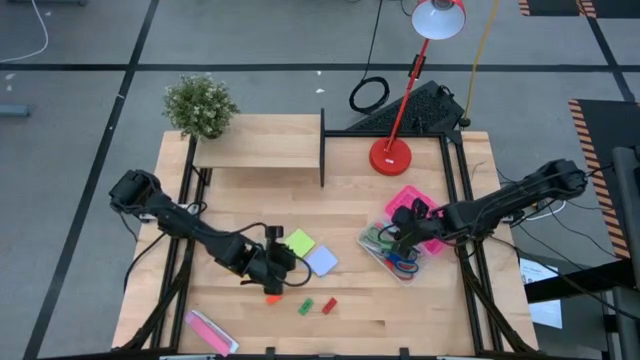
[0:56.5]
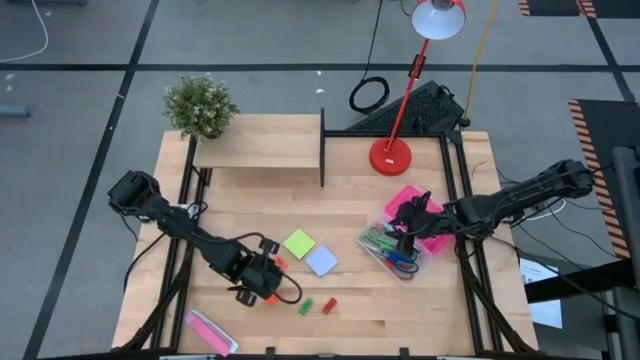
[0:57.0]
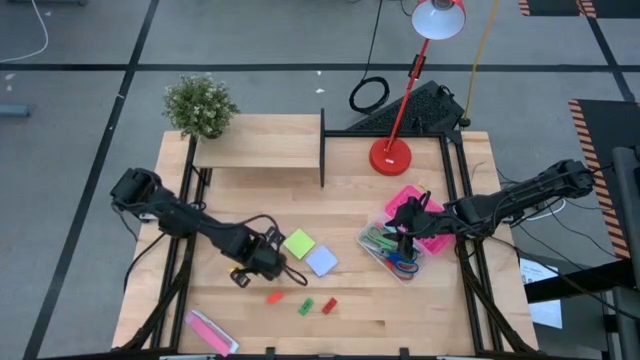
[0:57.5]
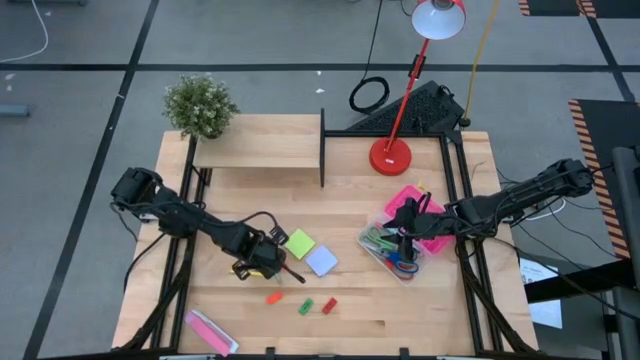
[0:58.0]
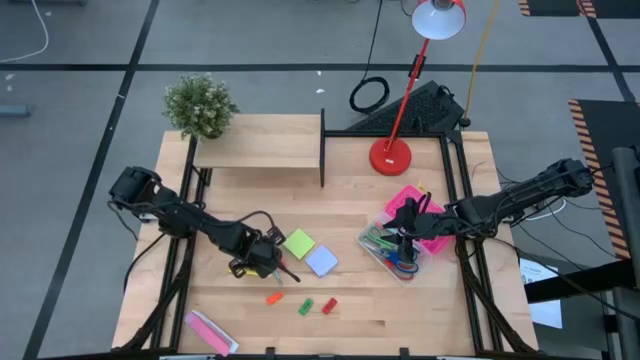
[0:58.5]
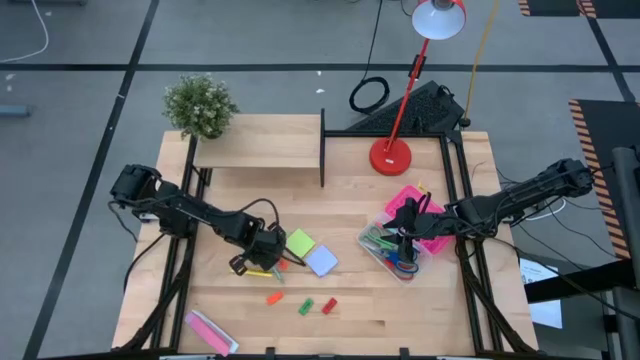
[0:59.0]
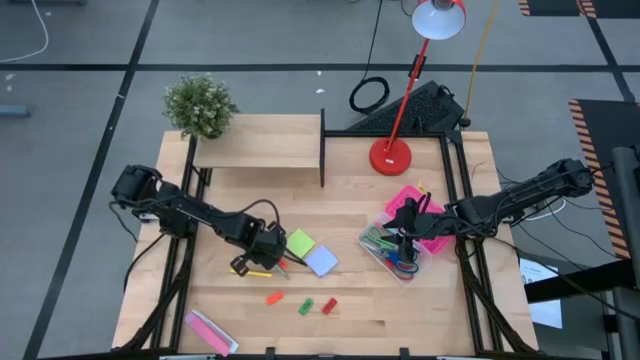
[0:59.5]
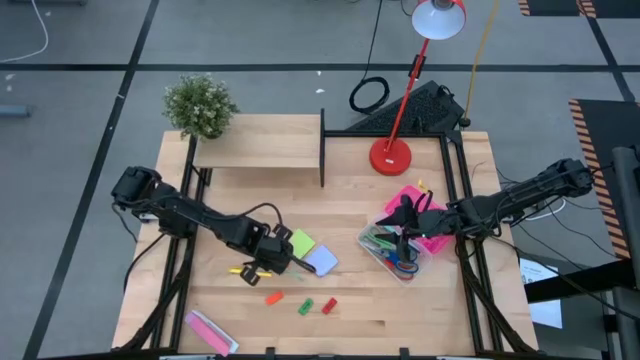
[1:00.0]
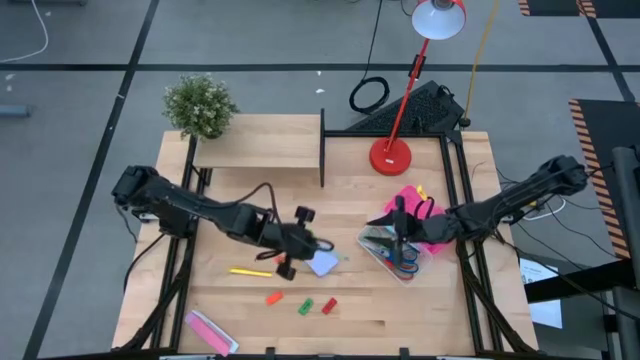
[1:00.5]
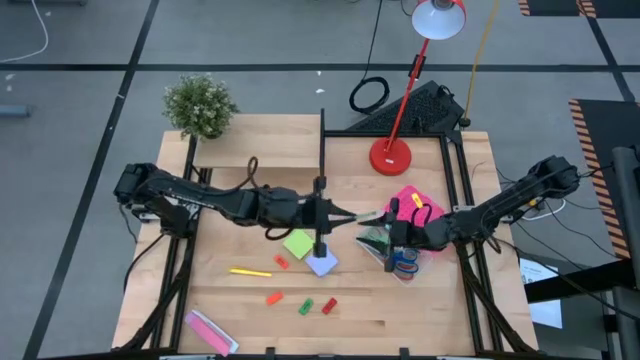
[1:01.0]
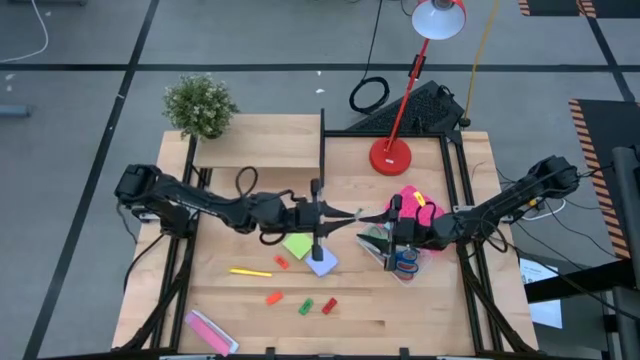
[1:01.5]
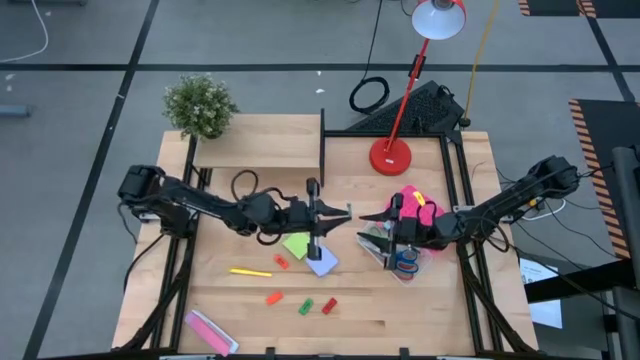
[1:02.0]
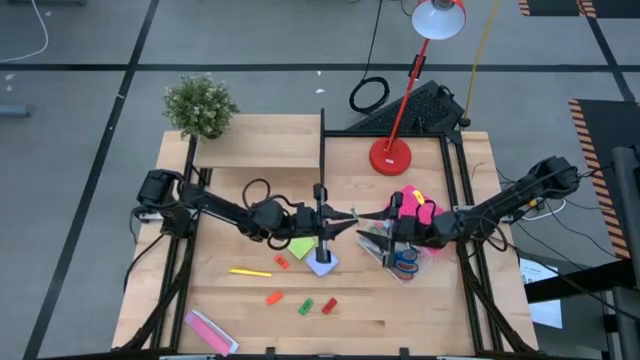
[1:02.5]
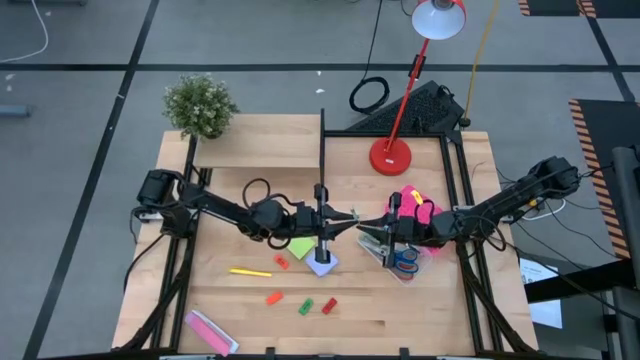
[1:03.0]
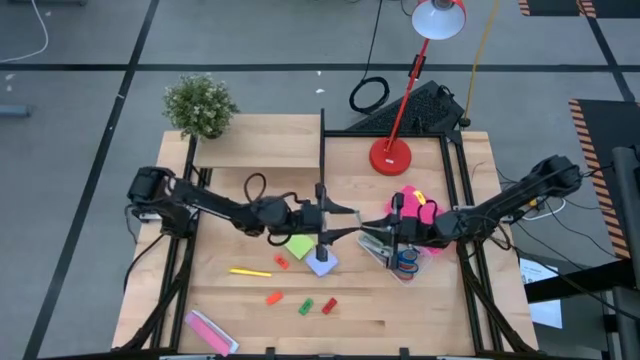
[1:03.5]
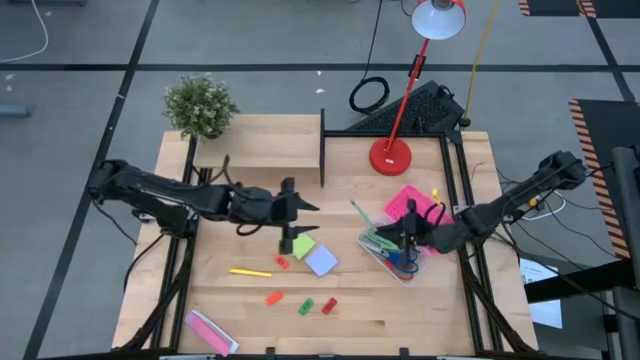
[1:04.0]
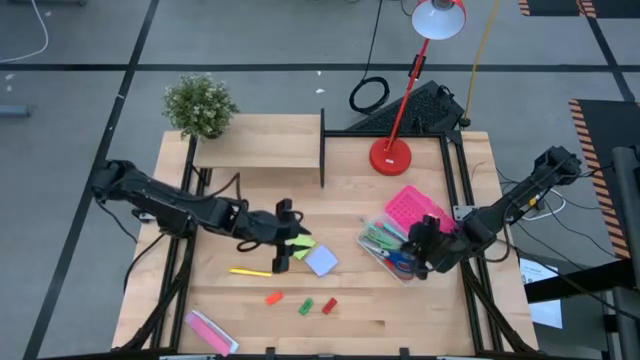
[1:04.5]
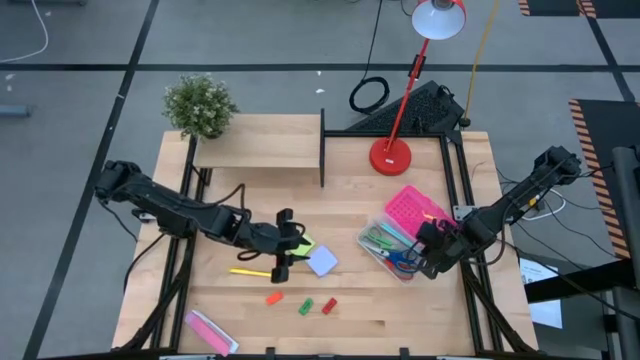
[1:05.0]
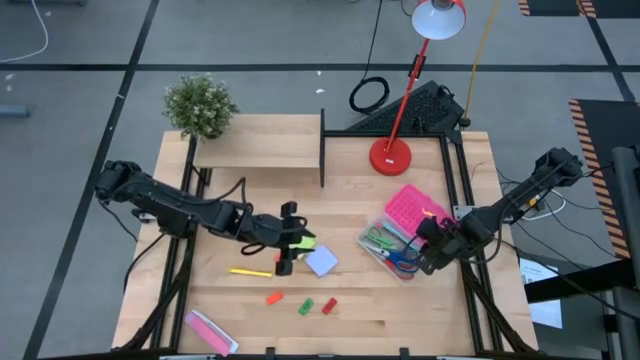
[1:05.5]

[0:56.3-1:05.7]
Task: Pack school essentials
Put the blue pencil into the pink supply box

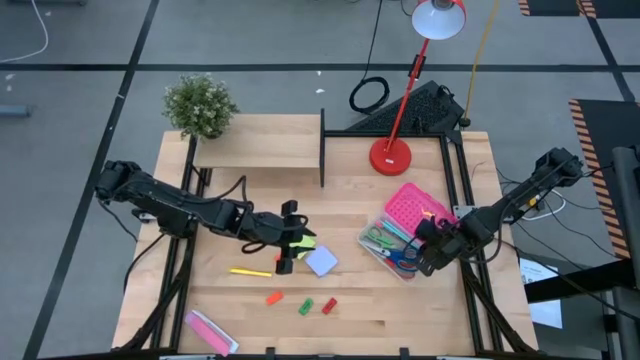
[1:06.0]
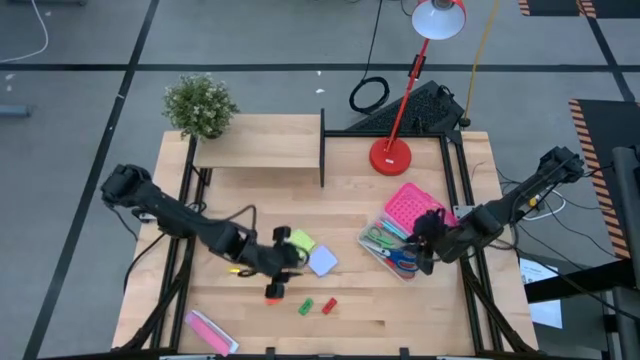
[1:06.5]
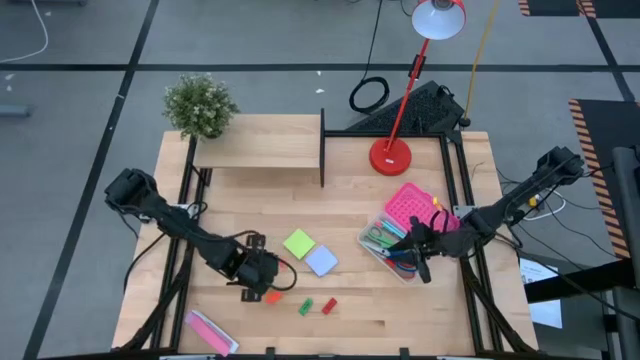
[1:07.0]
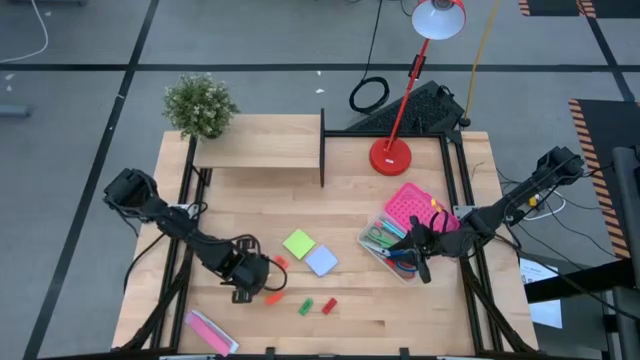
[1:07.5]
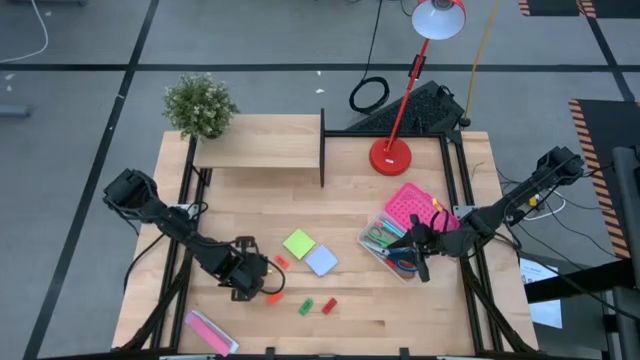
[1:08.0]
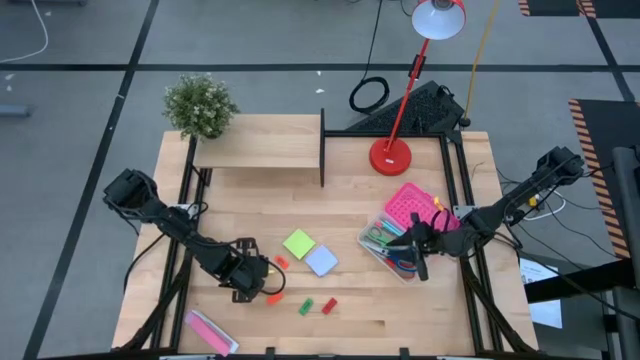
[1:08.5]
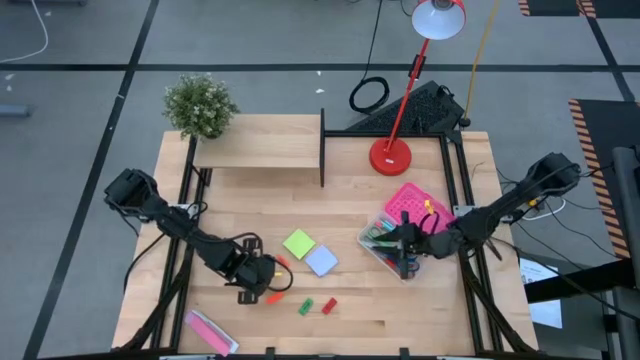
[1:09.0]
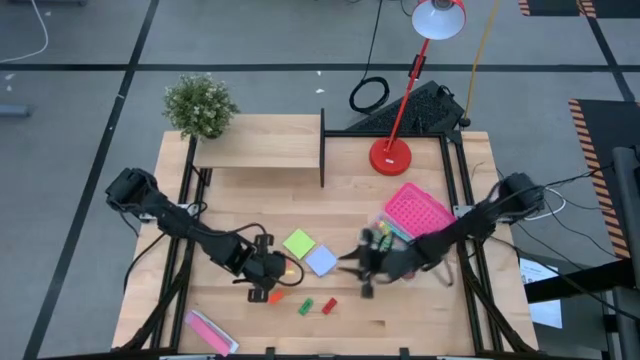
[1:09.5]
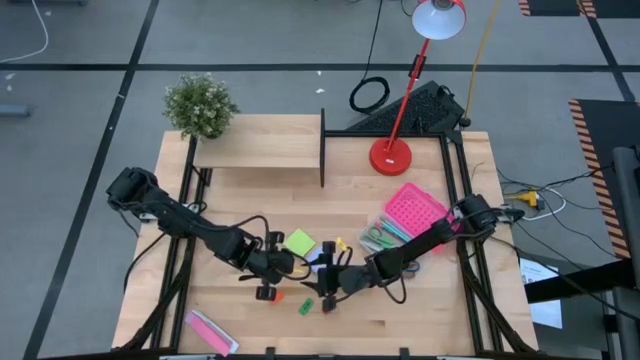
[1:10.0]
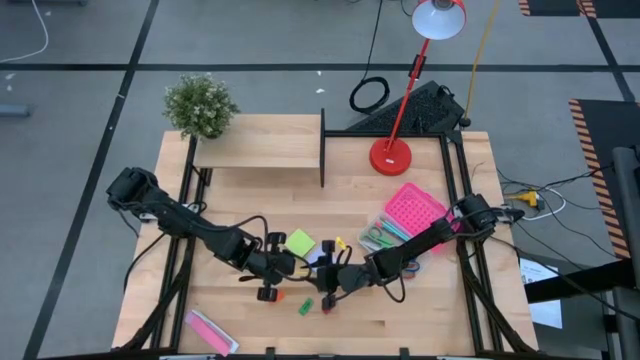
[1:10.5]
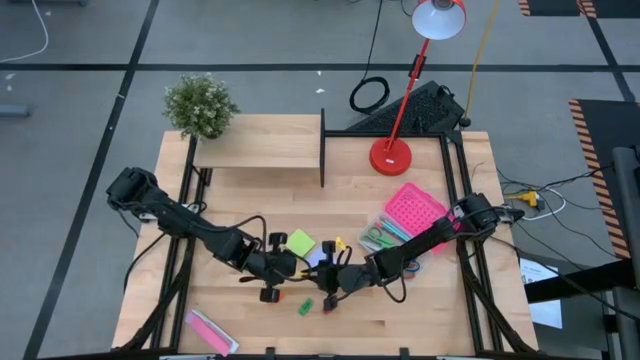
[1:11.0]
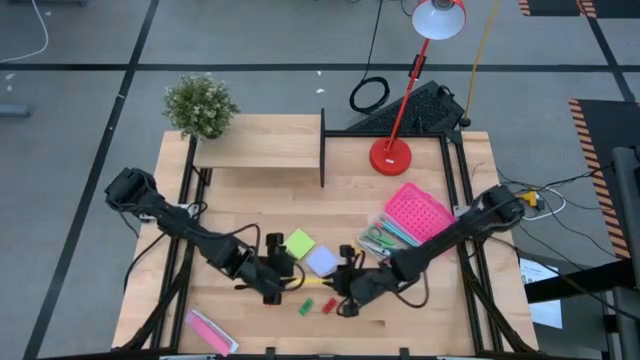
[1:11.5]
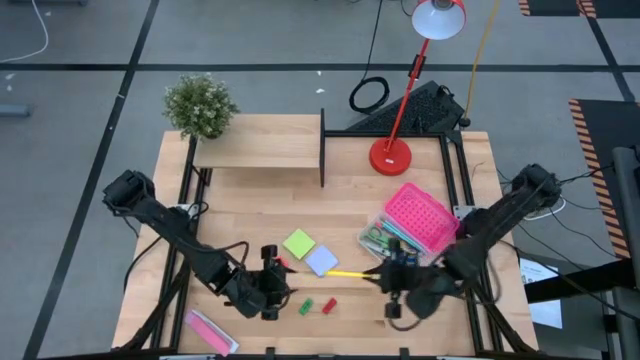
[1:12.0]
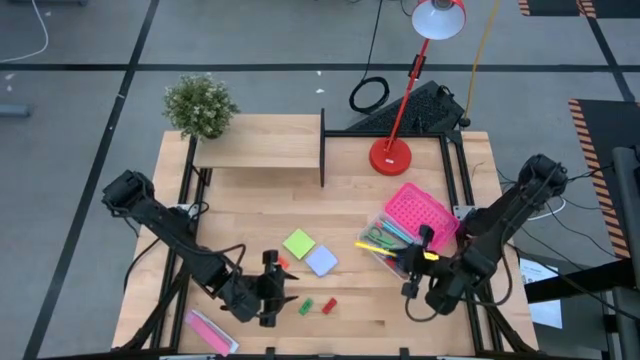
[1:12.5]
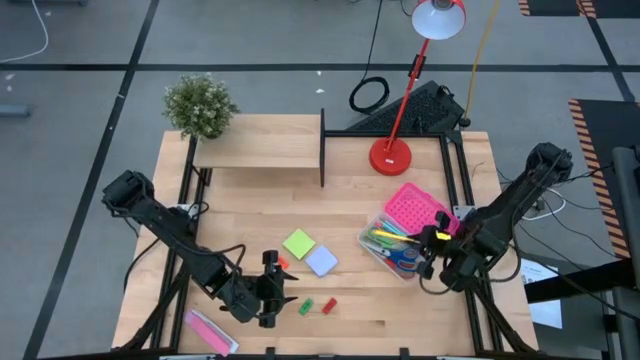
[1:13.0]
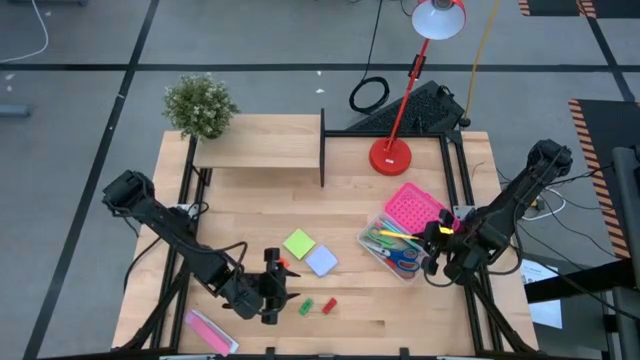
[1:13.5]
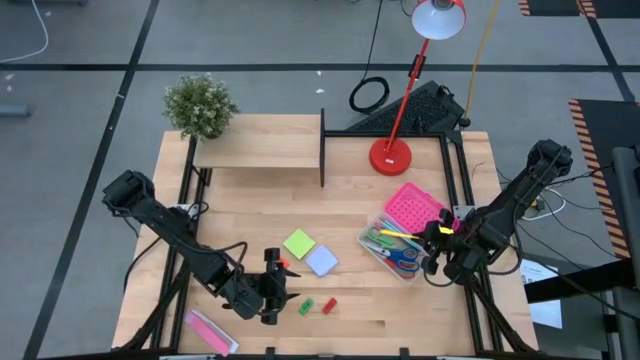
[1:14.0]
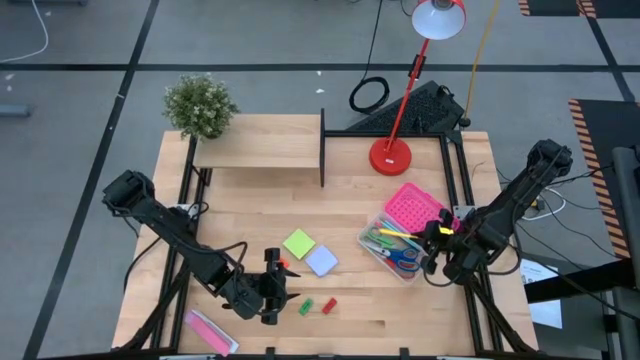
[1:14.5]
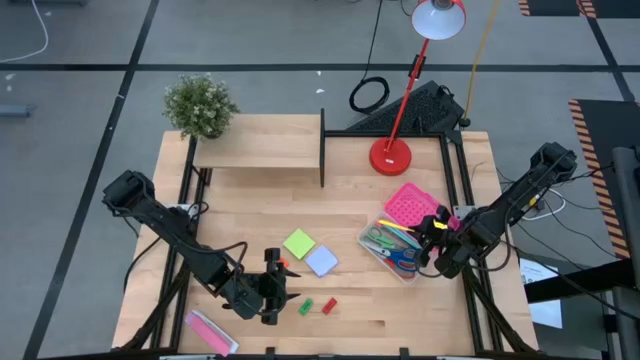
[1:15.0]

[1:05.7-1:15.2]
Put the yellow pen into the pink supply box

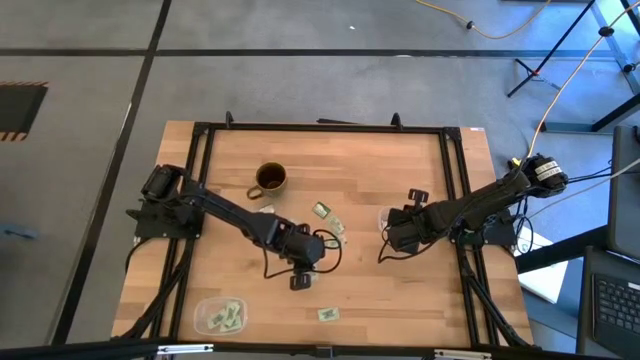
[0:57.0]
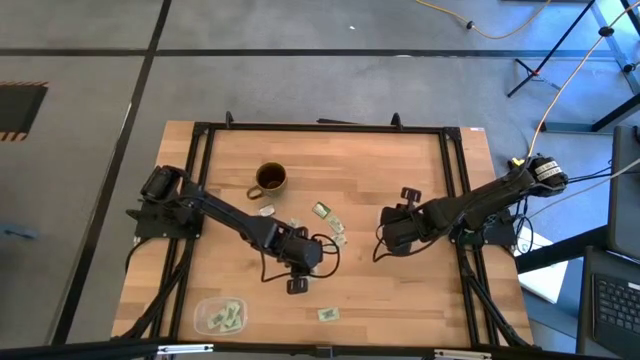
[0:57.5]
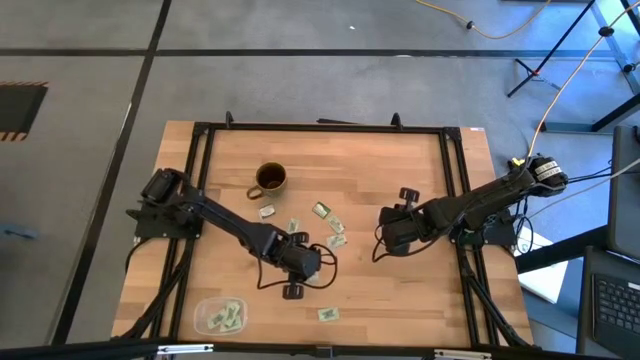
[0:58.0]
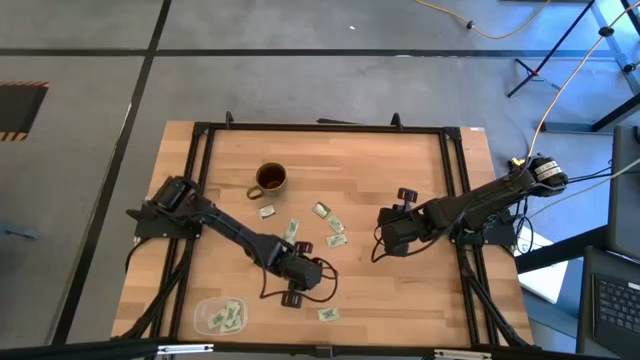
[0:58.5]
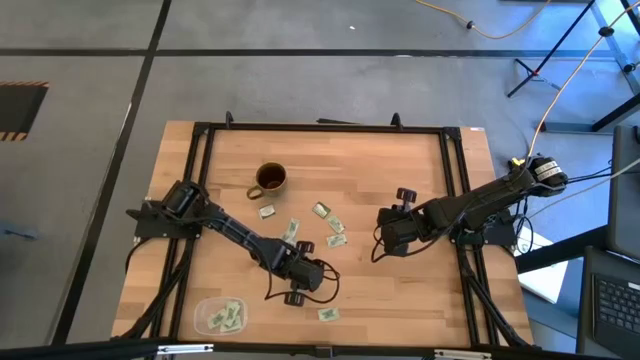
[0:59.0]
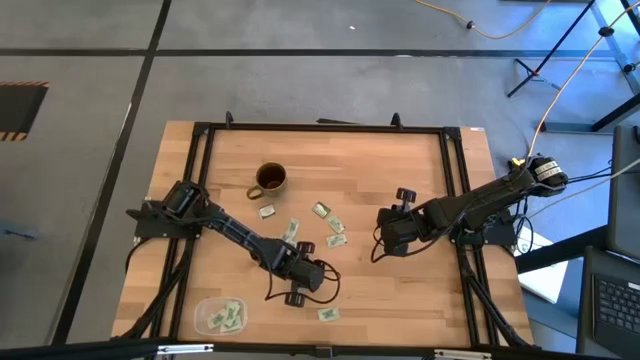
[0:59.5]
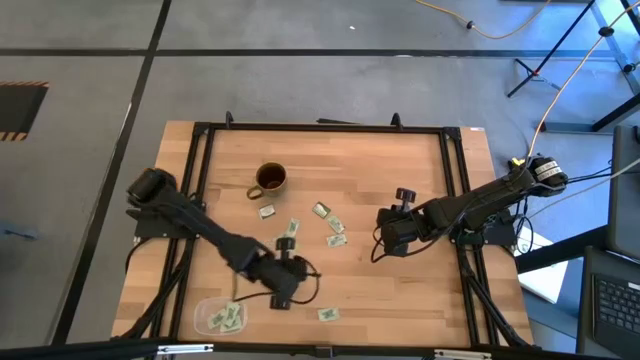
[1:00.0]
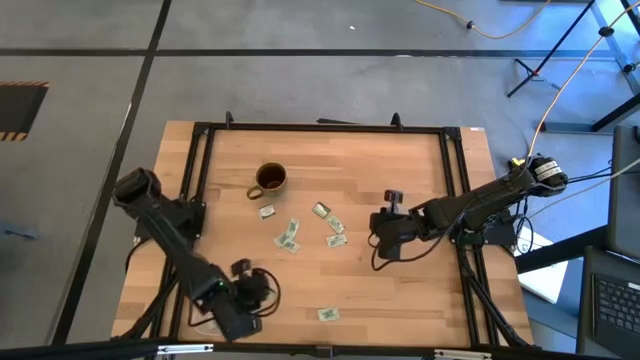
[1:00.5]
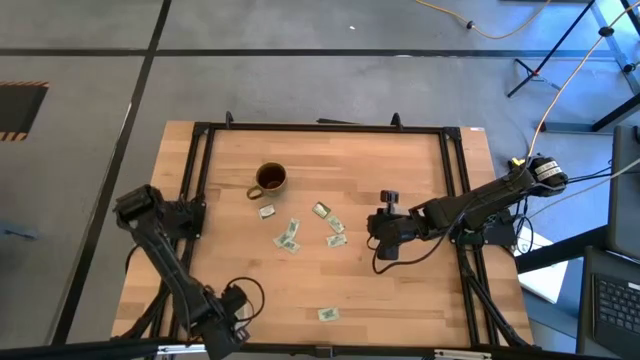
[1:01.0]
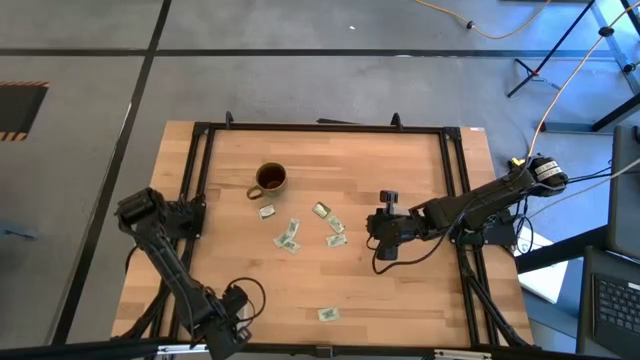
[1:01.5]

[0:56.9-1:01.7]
Task: Pick and place Stevia / Truvia into bins
Put the stevia packet into the bottom transparent container
